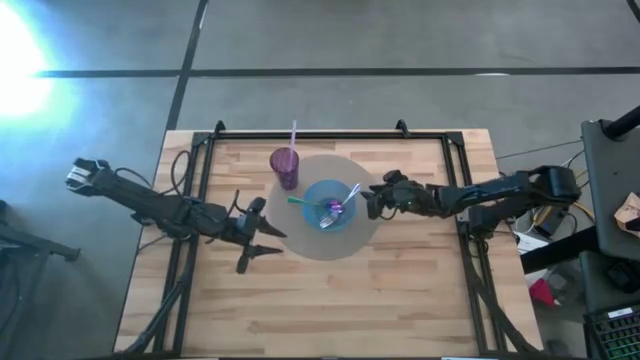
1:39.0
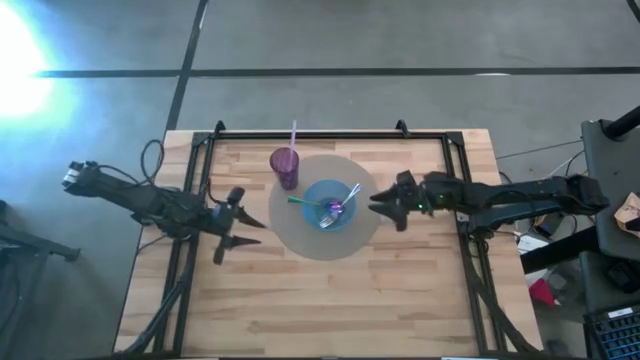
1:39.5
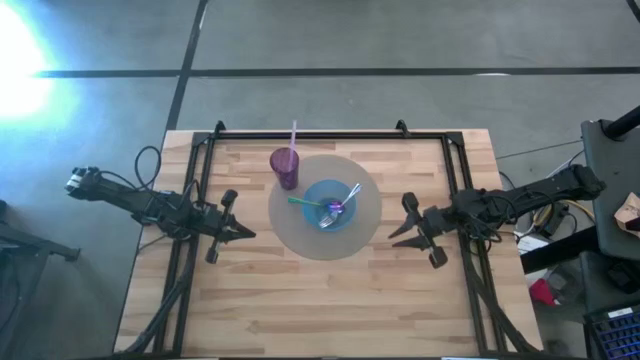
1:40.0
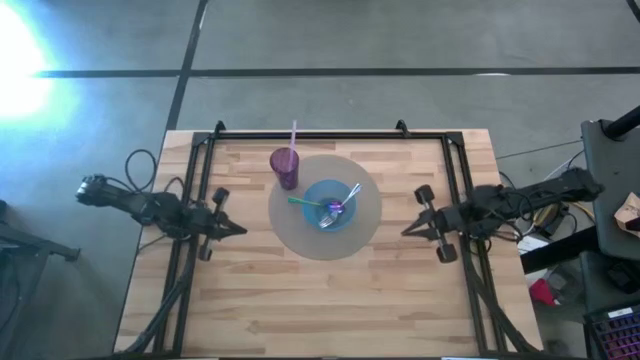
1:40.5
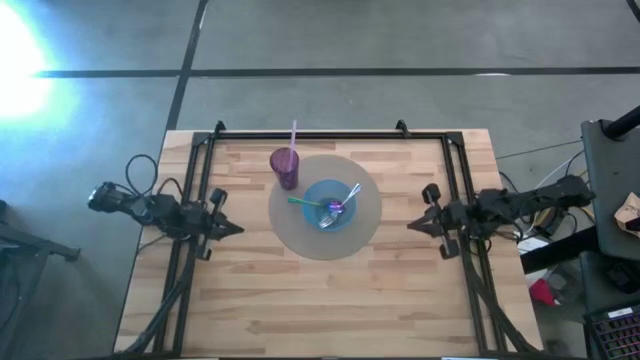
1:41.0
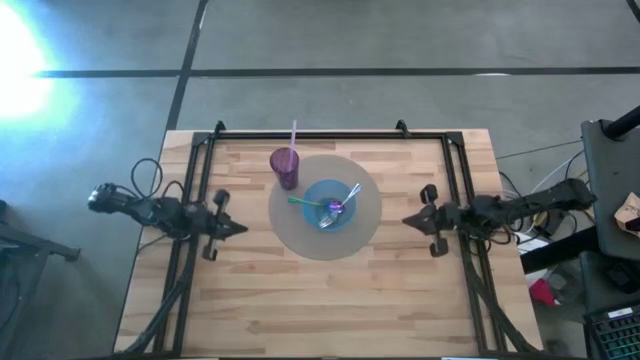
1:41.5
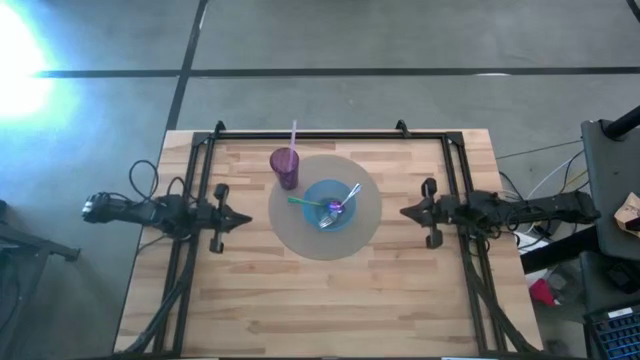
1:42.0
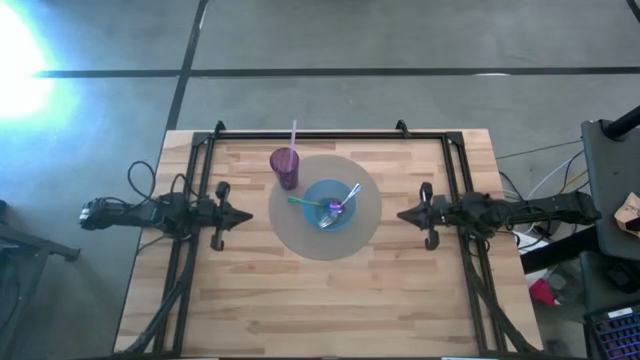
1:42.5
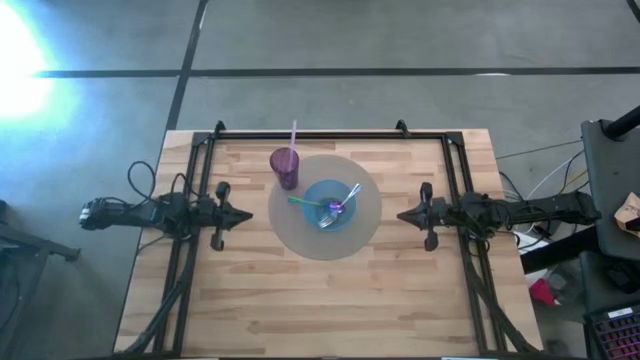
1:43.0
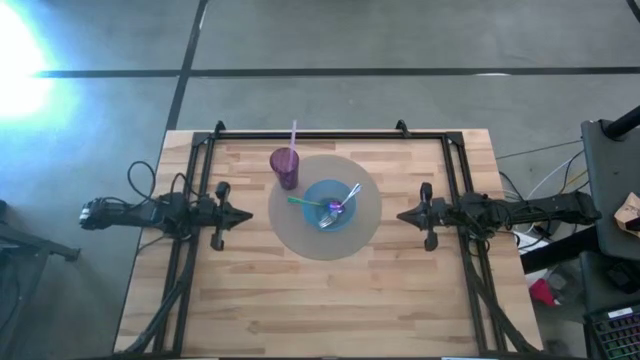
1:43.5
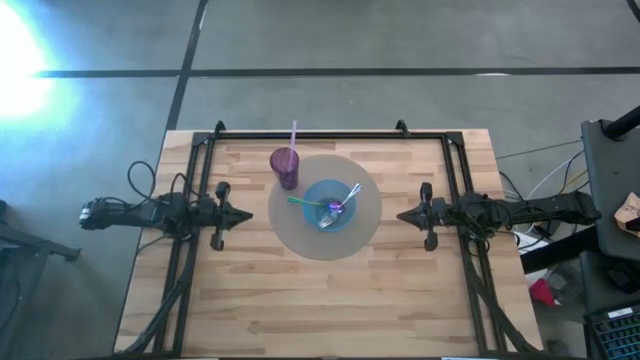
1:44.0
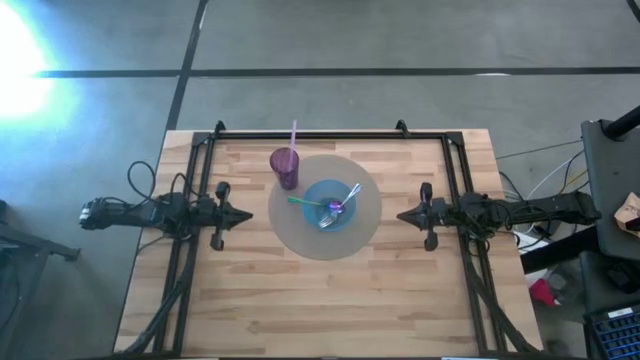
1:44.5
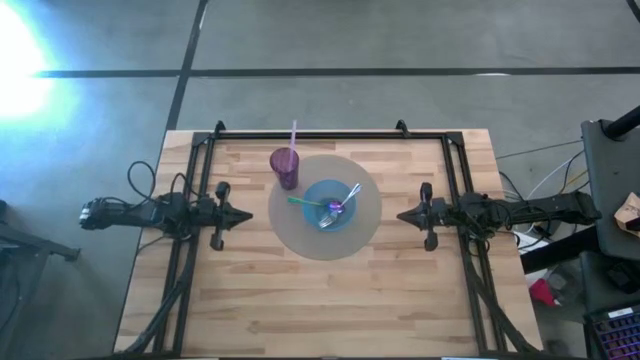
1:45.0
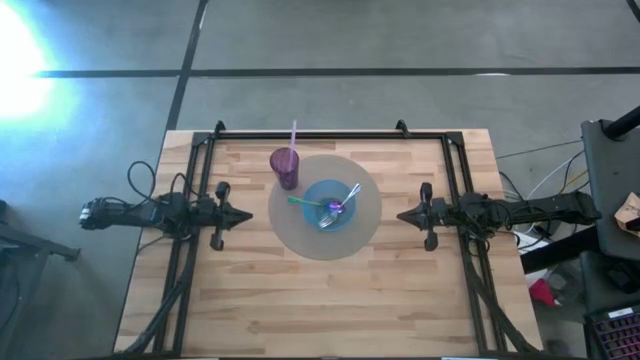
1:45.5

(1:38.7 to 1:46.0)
Task: Pick & Place Utensil
Return to Home Position

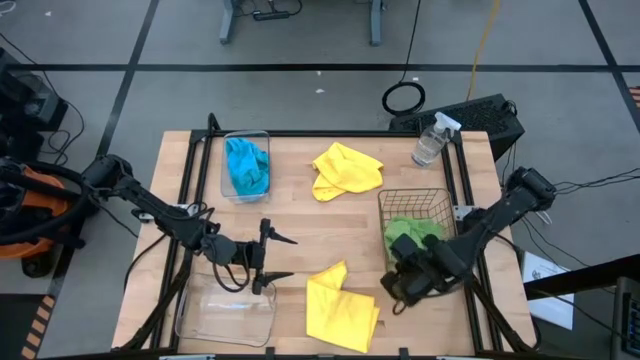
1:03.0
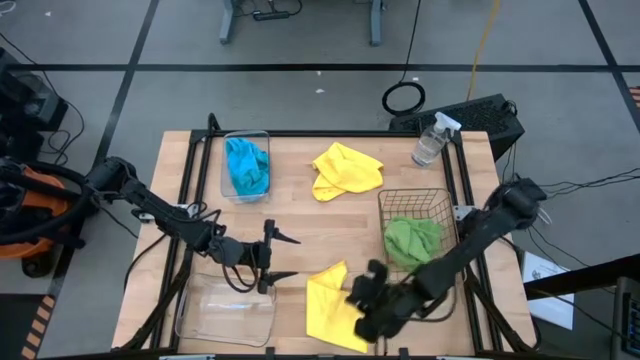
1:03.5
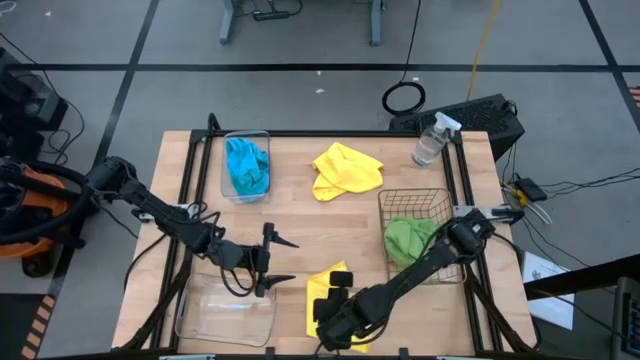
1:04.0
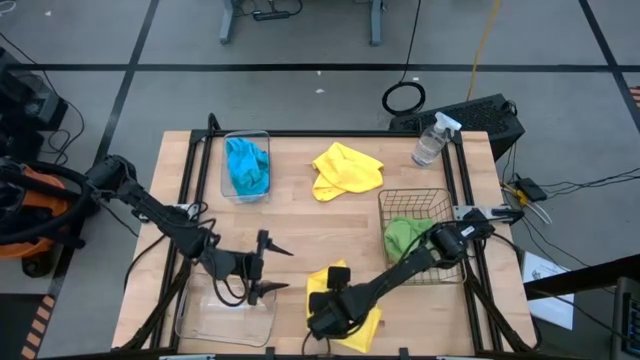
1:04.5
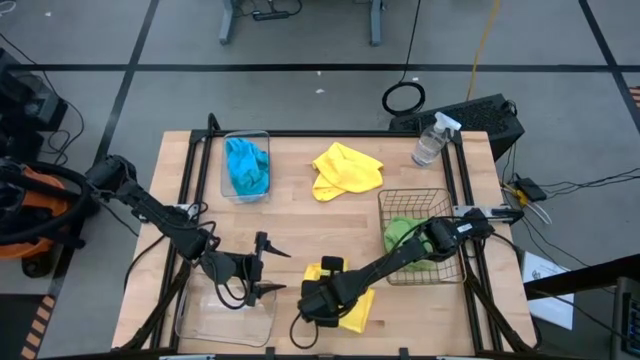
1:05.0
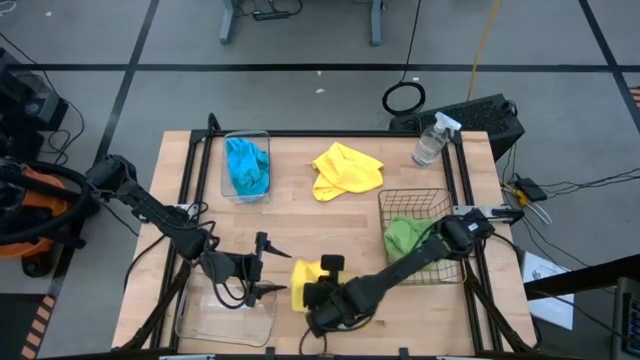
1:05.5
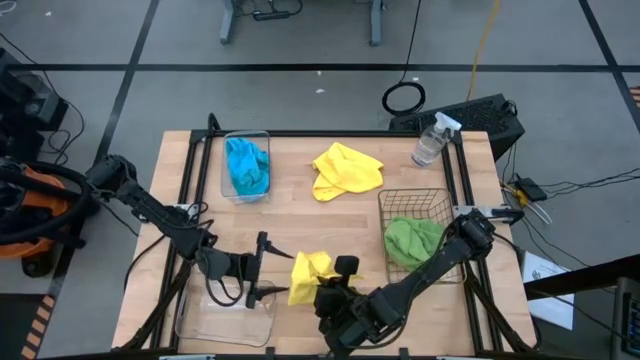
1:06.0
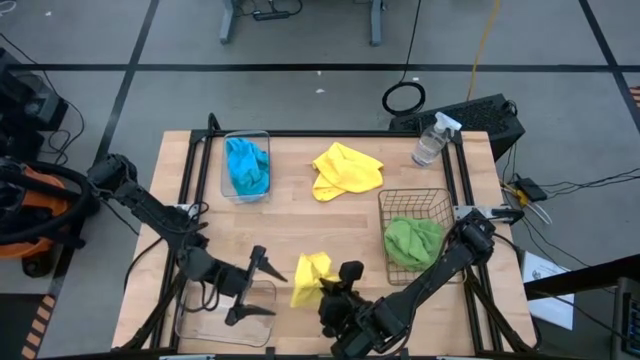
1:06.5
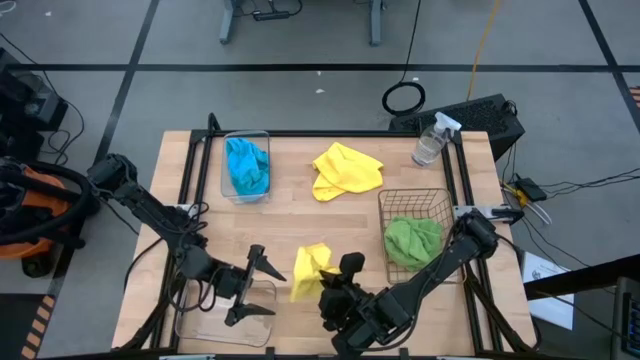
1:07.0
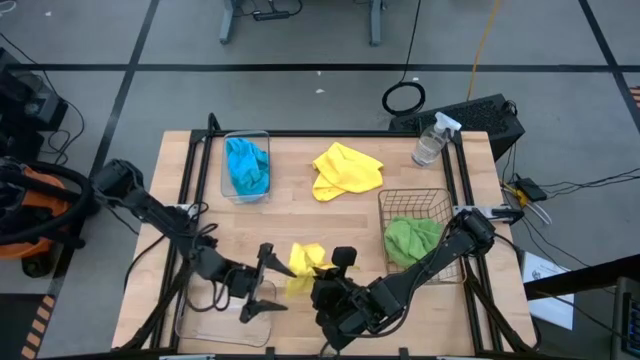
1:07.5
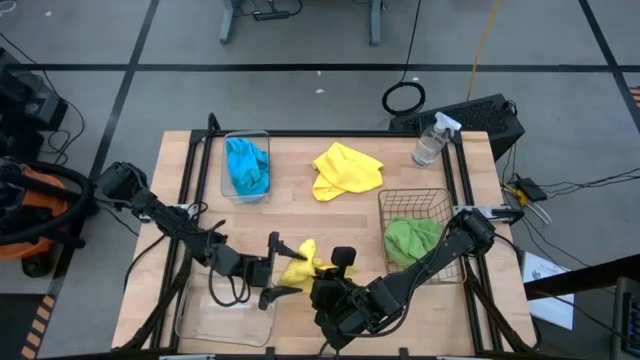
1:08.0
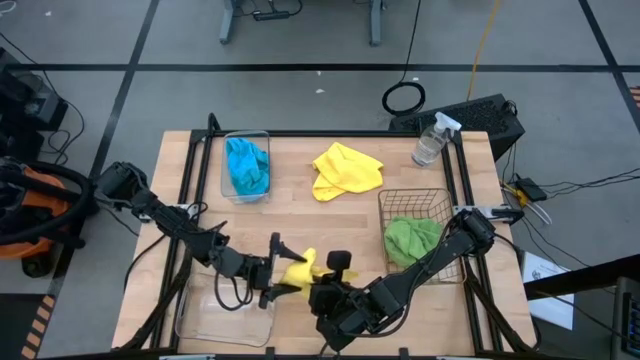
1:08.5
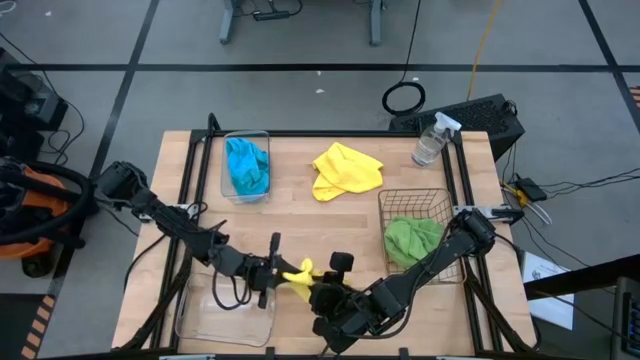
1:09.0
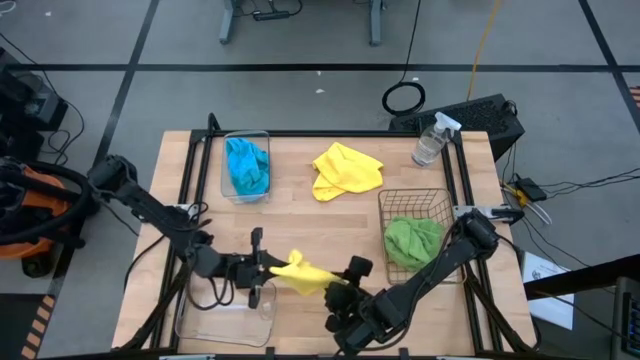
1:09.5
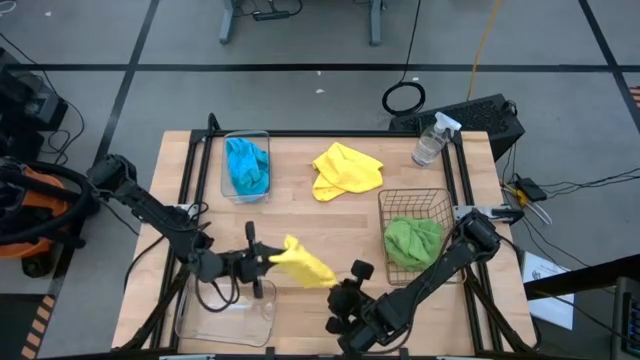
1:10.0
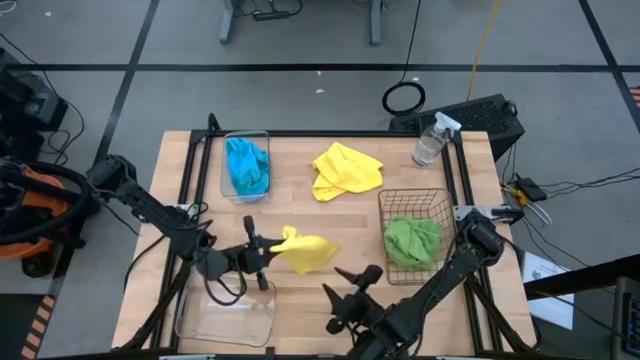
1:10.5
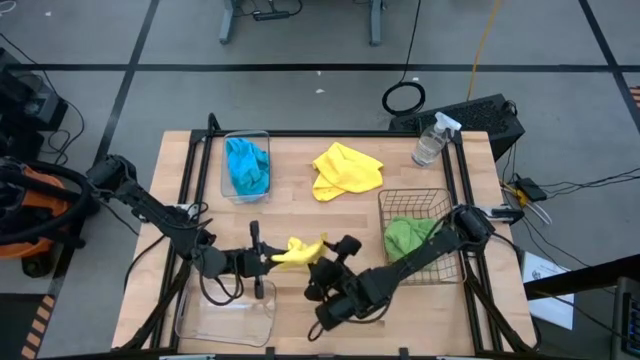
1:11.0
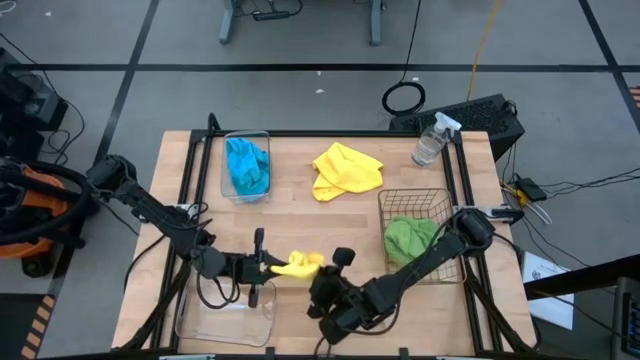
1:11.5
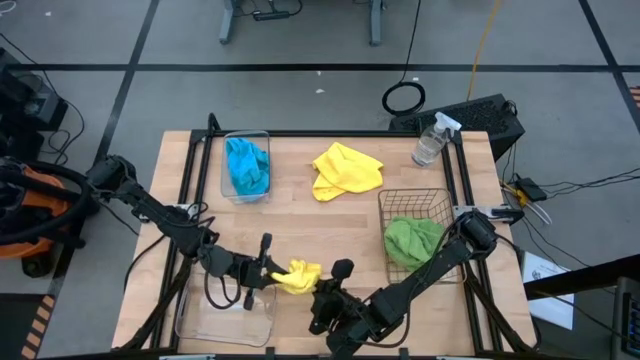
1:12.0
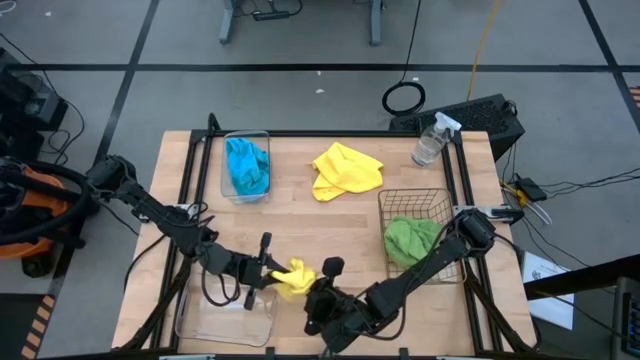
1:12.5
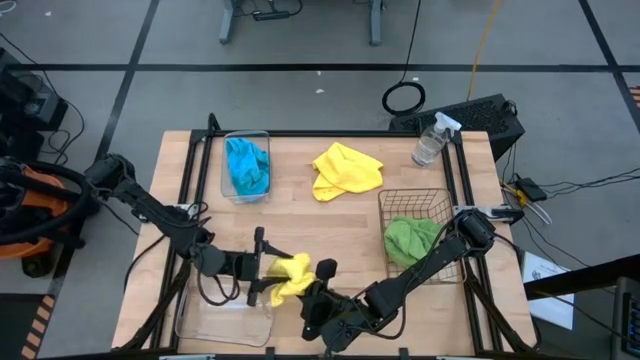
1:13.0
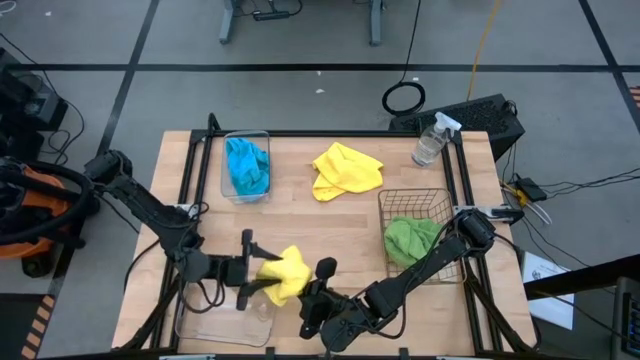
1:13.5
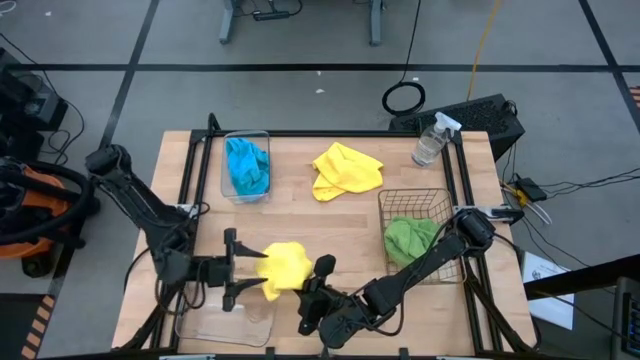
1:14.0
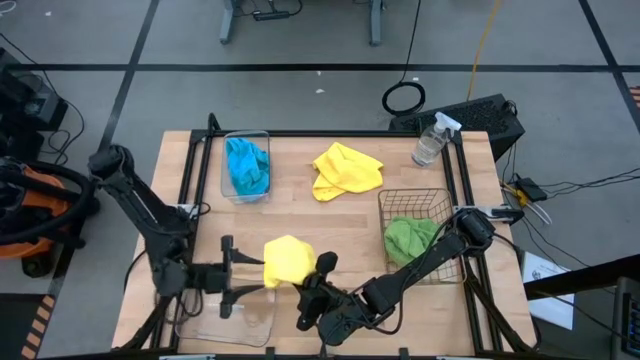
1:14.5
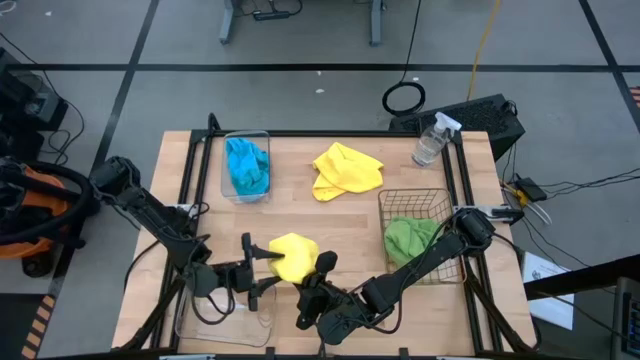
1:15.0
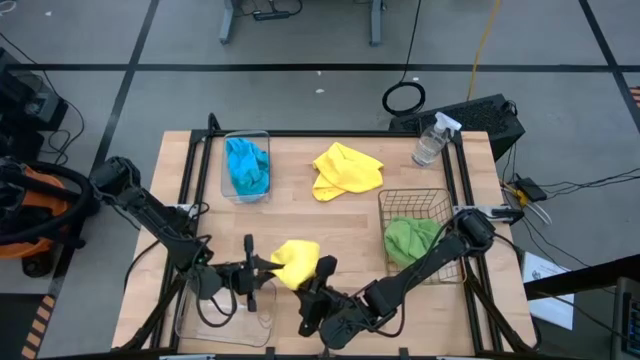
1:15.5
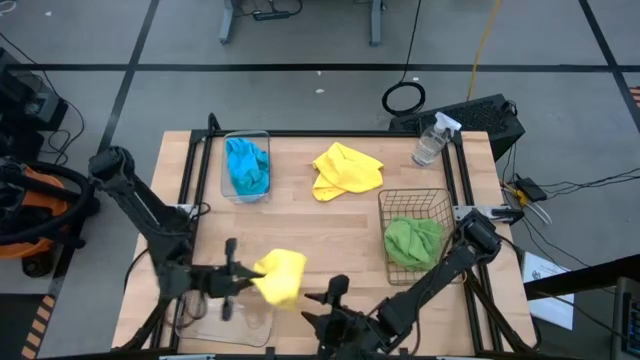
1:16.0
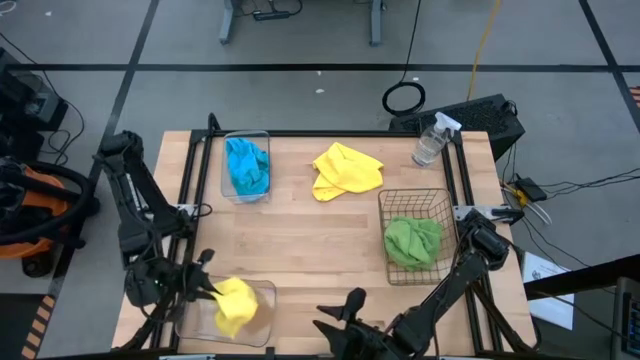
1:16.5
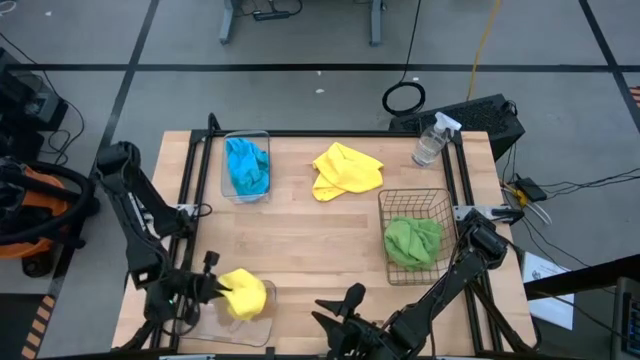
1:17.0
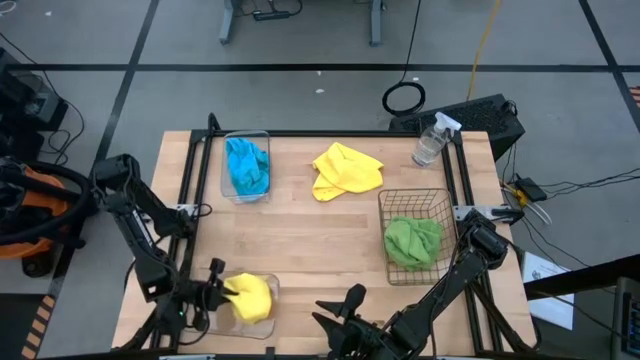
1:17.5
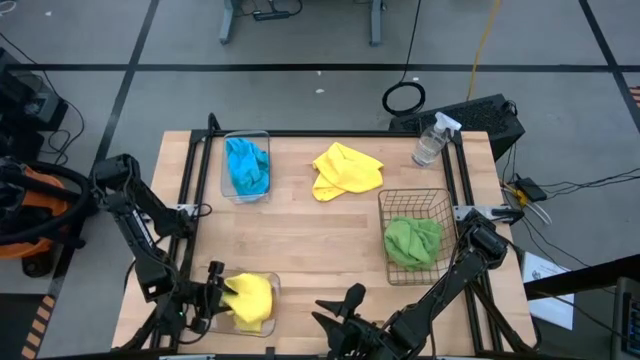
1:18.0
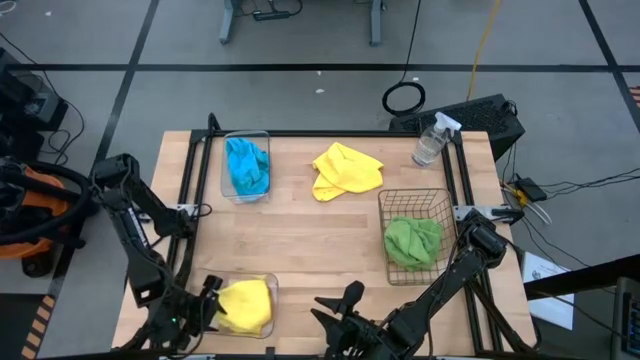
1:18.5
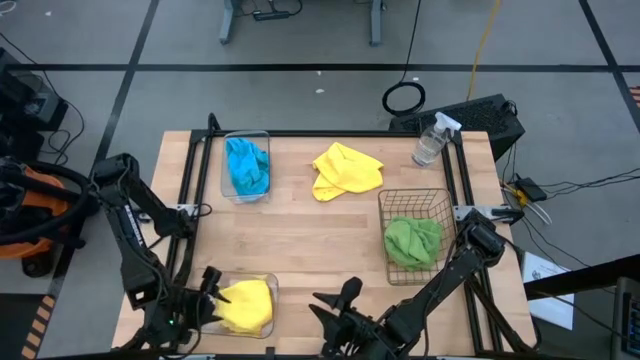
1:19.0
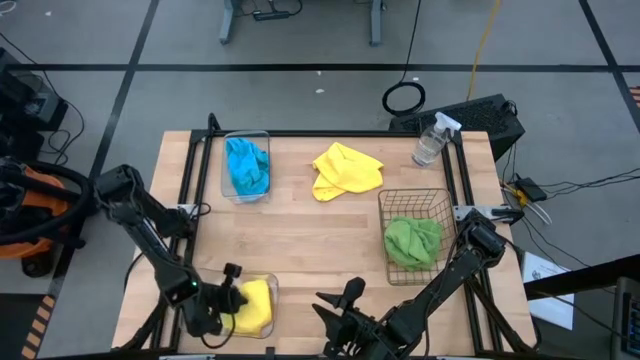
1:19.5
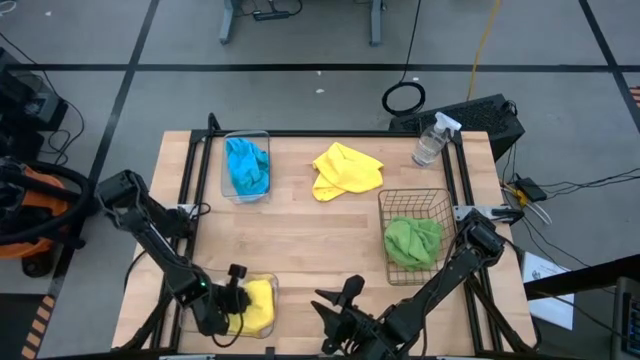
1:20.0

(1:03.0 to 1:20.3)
Task: Sort microfiber towel by color & place in baskets
Put the bottom yellow microfiber cloth into the bottom transparent bin
